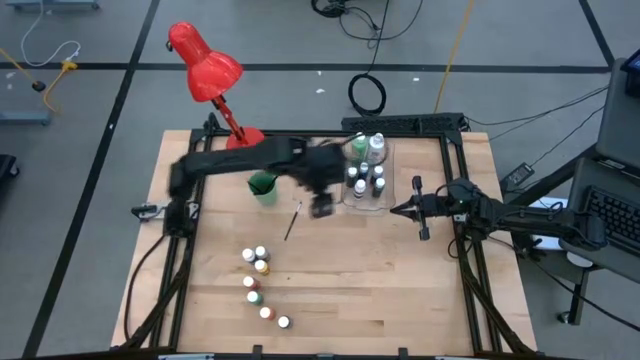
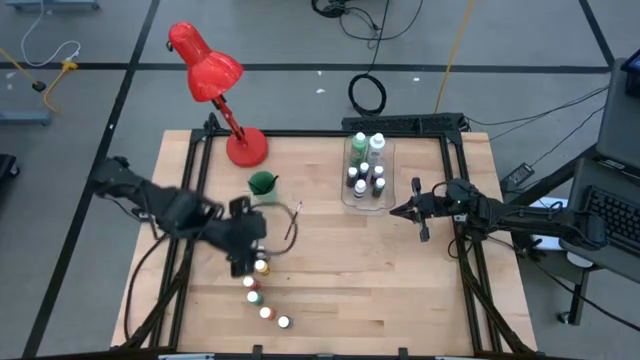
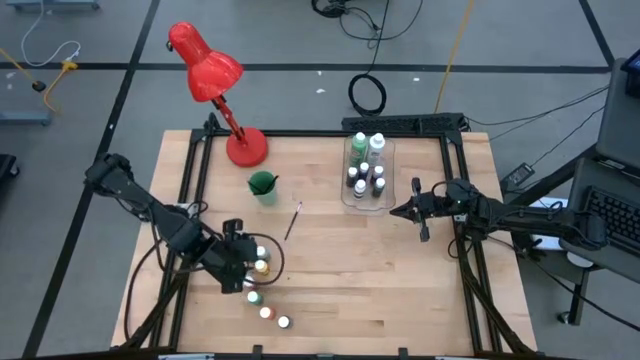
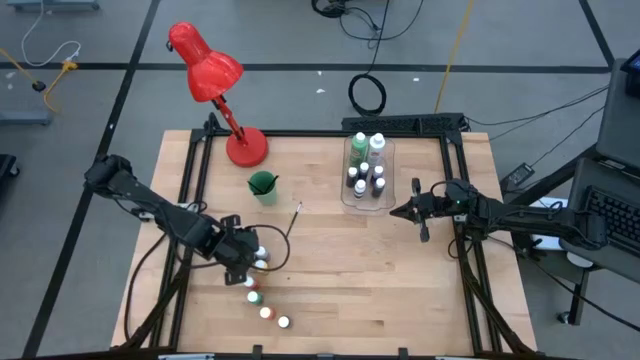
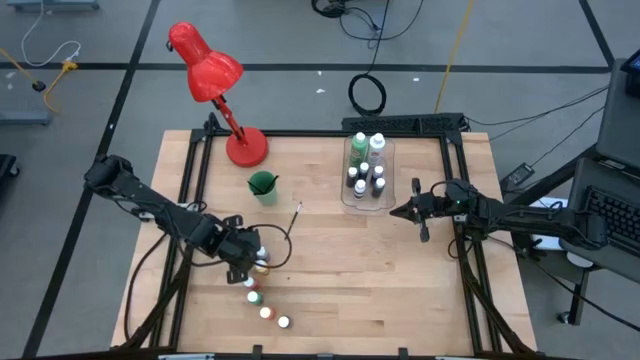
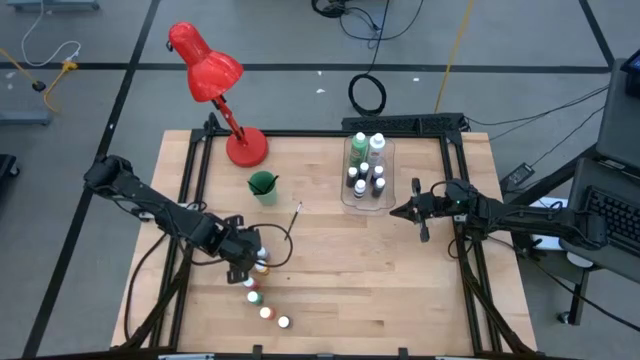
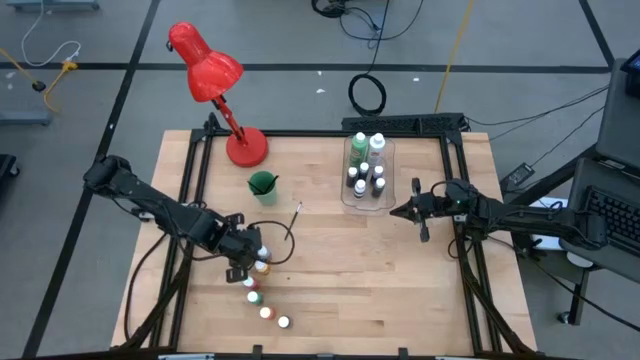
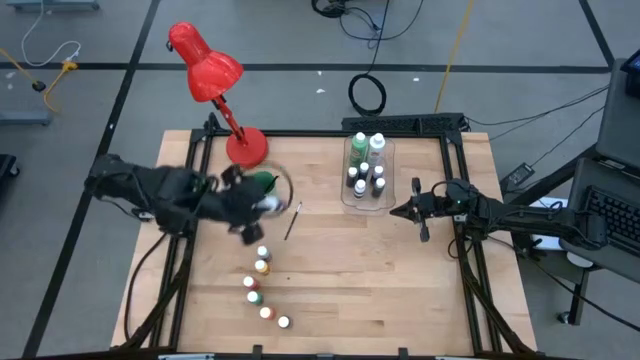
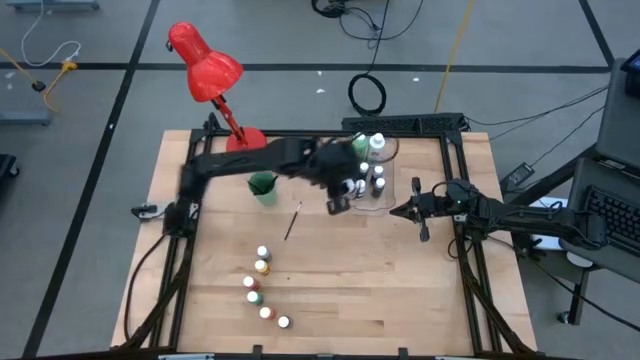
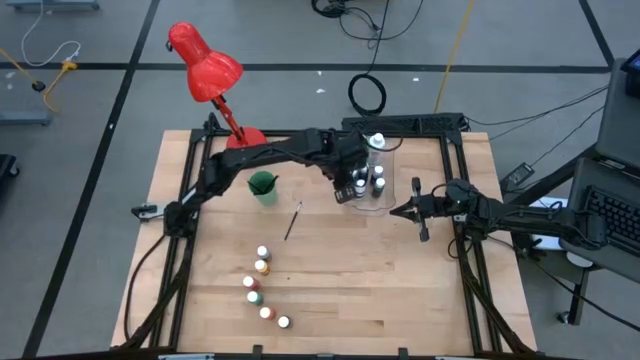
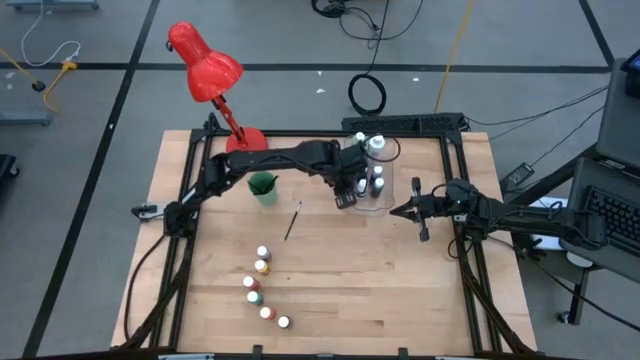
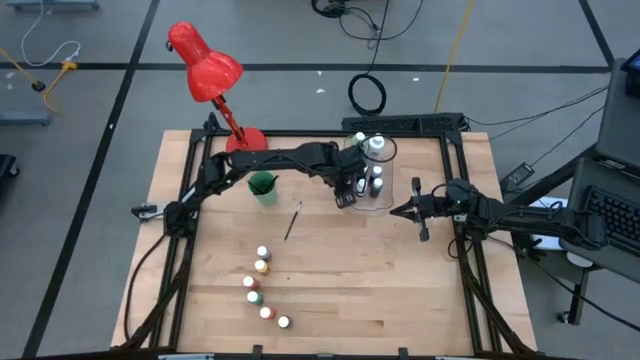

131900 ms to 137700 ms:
Task: Pick & Place Paint Supplies
Put the small white paint bottle into the transparent bin

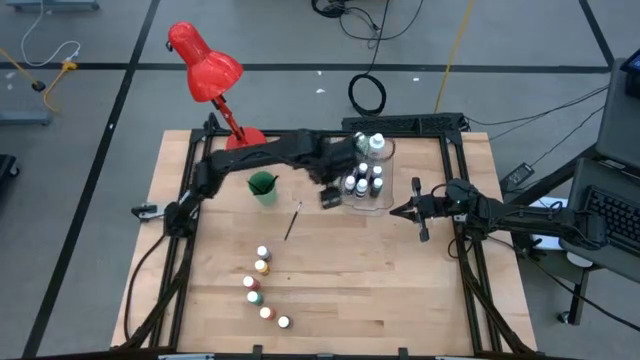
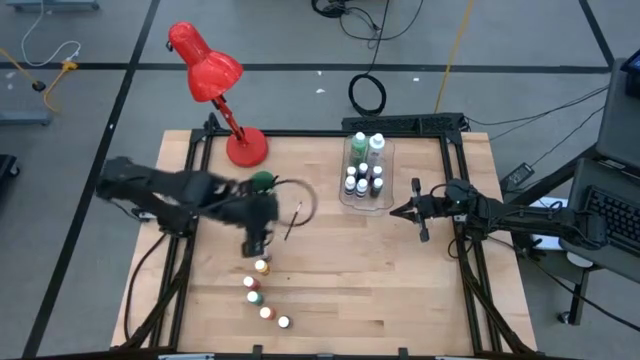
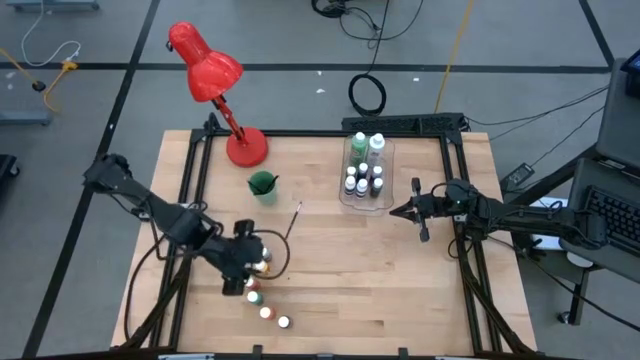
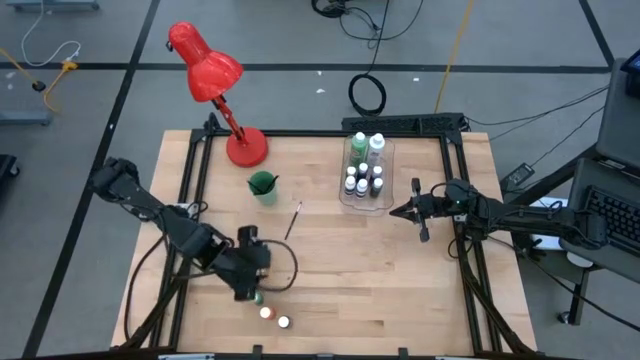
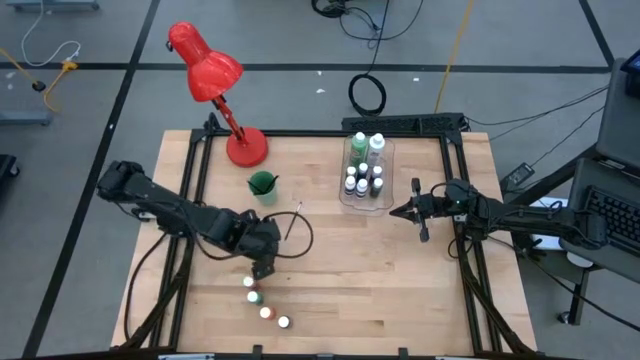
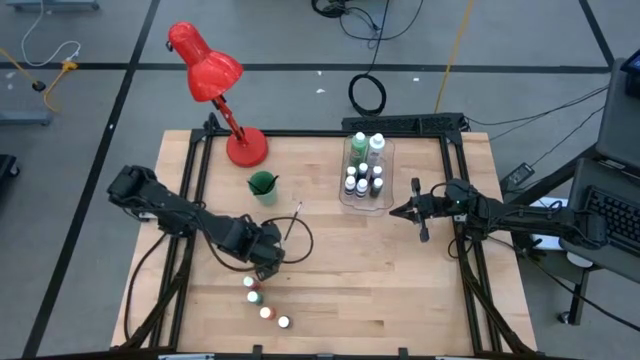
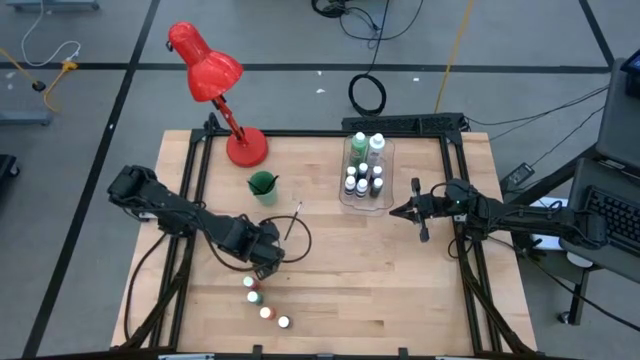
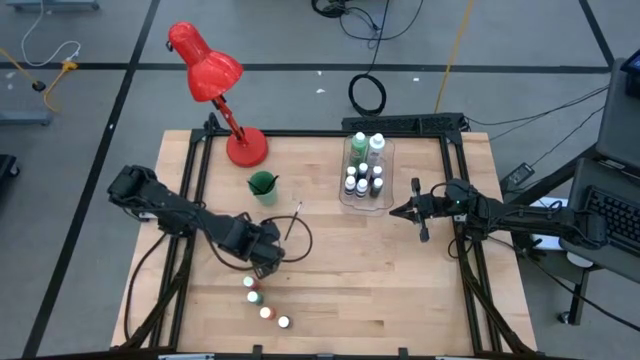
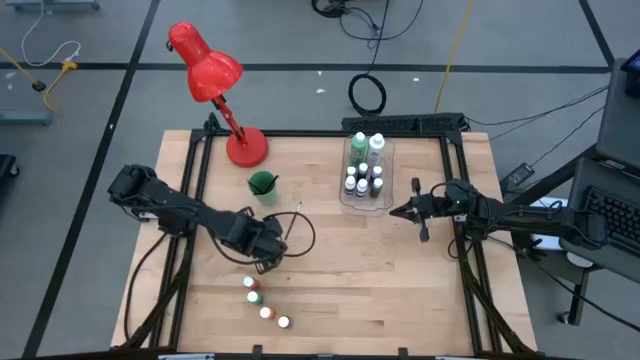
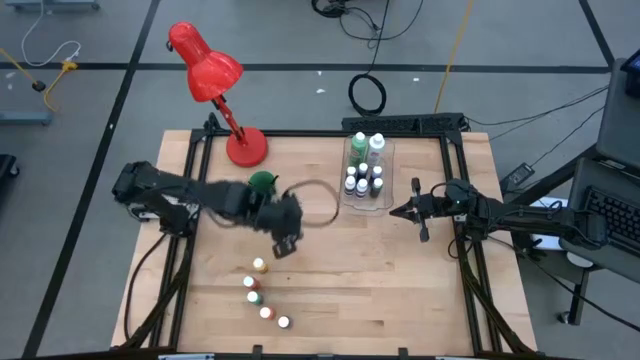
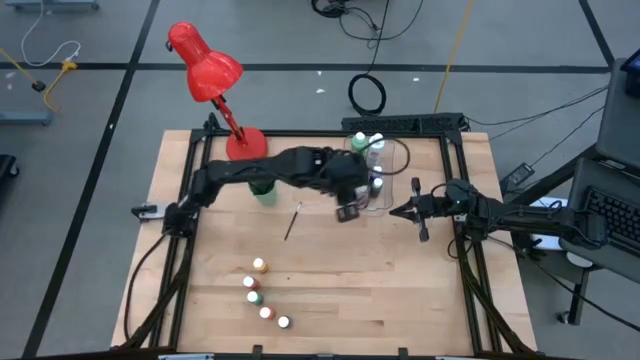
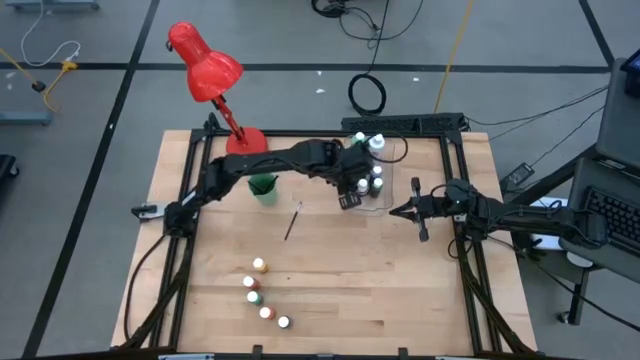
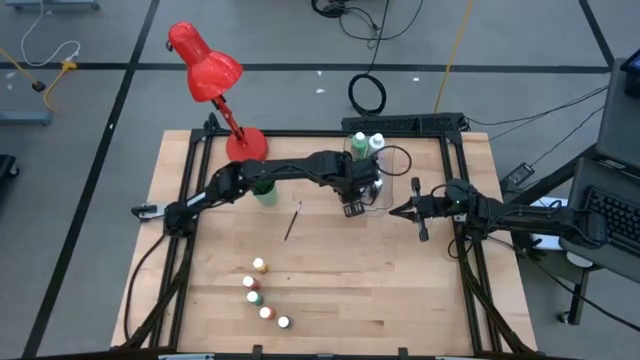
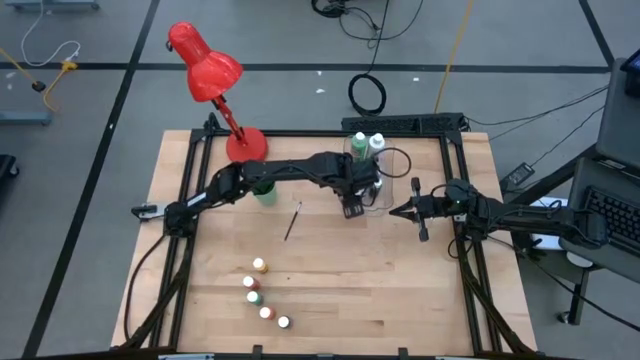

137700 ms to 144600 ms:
Put the small gray paint bottle into the transparent bin

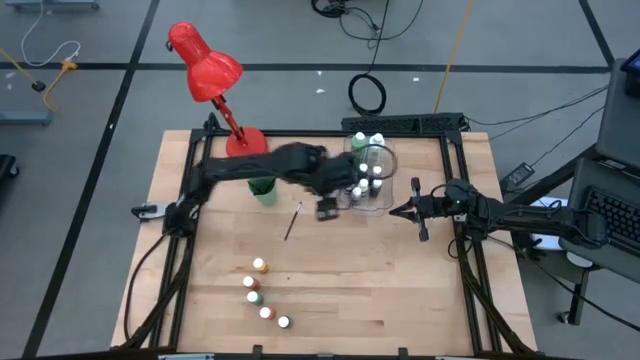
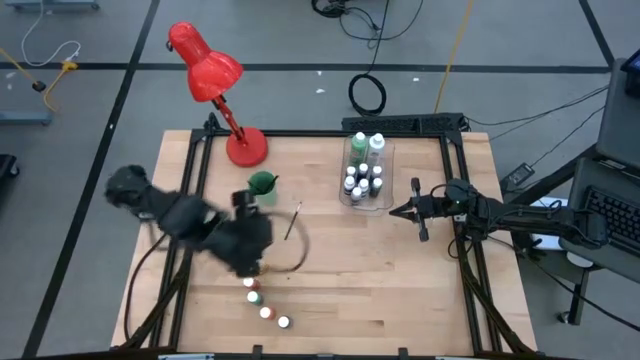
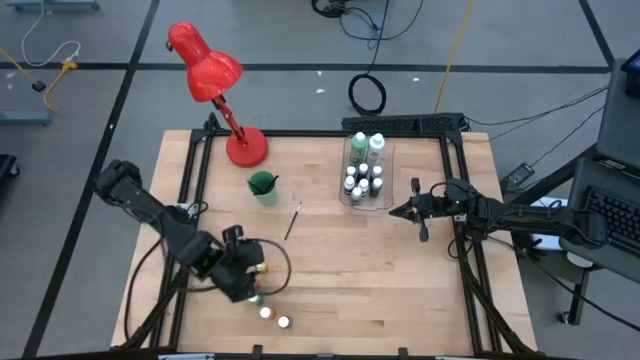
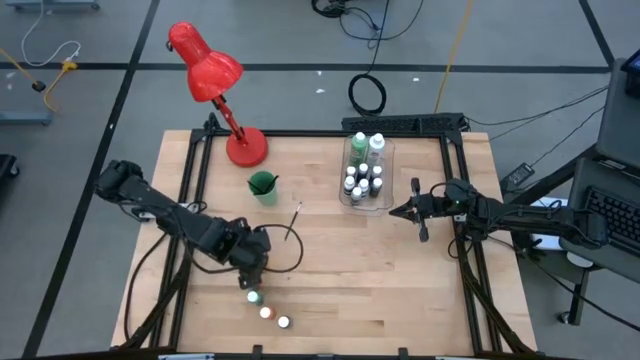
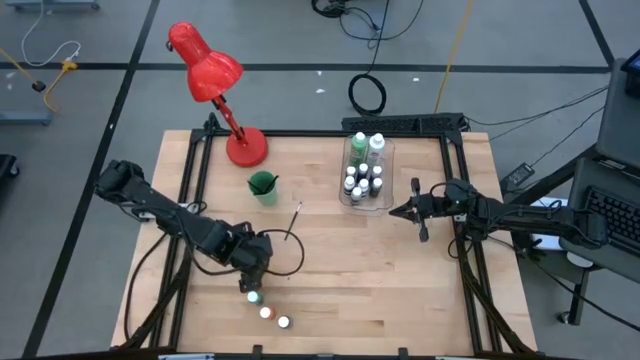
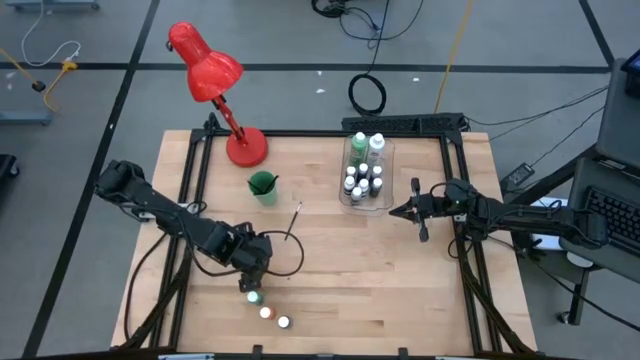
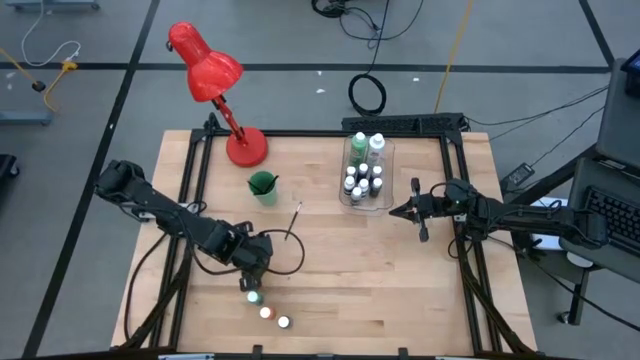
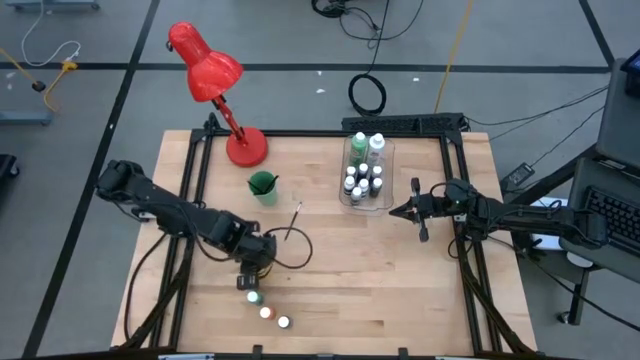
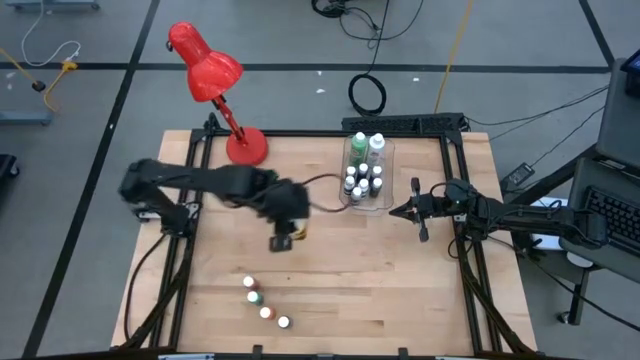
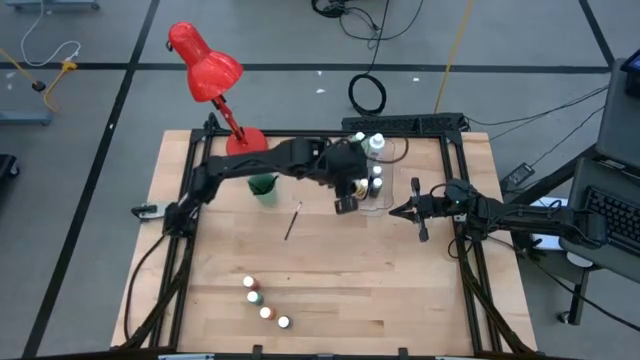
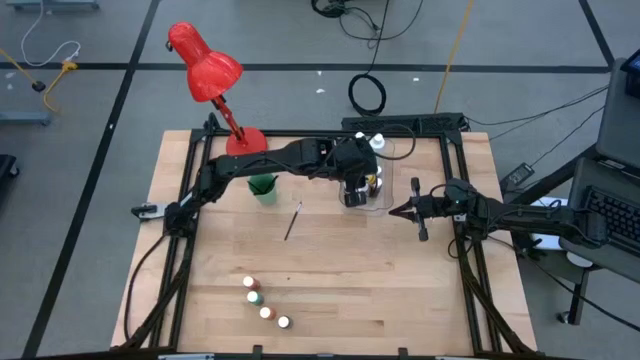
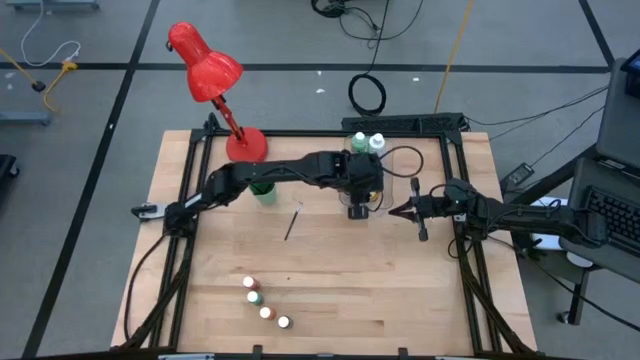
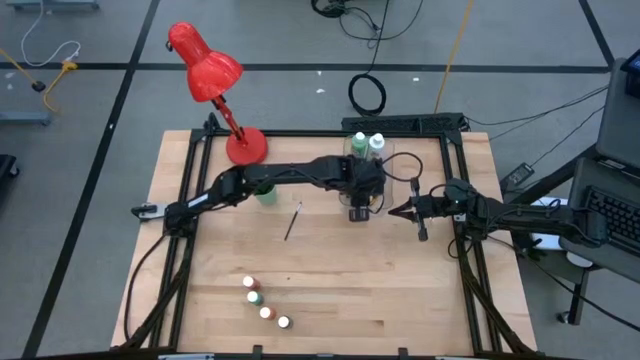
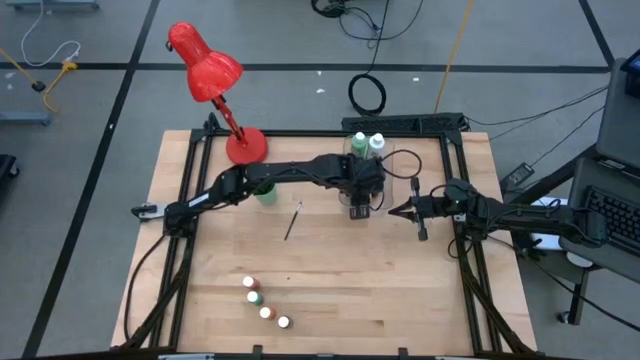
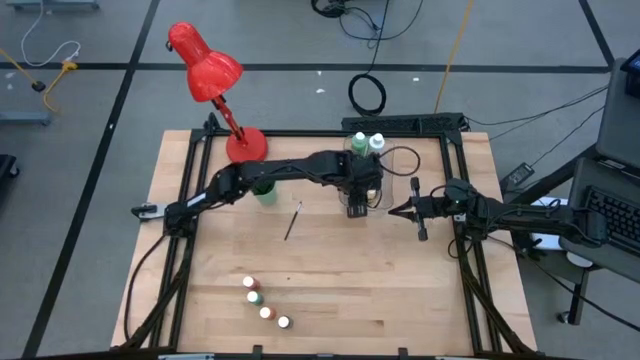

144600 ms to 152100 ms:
Put the small yellow paint bottle into the transparent bin

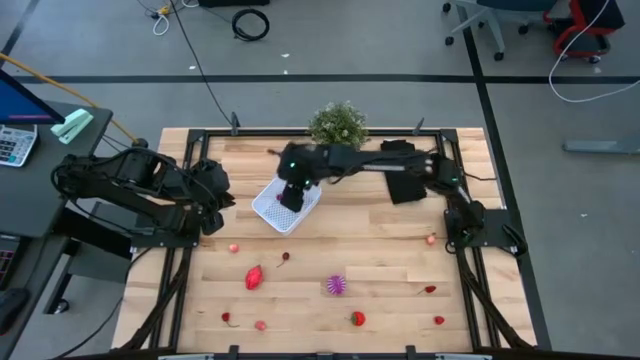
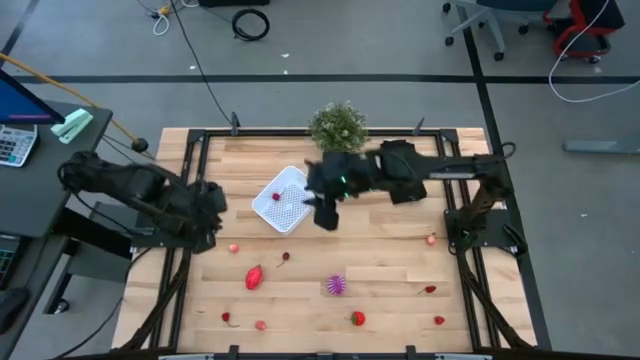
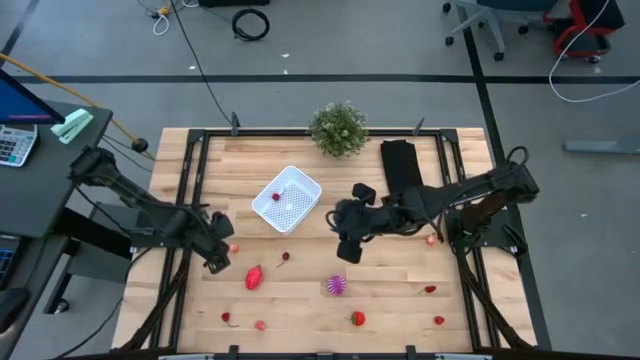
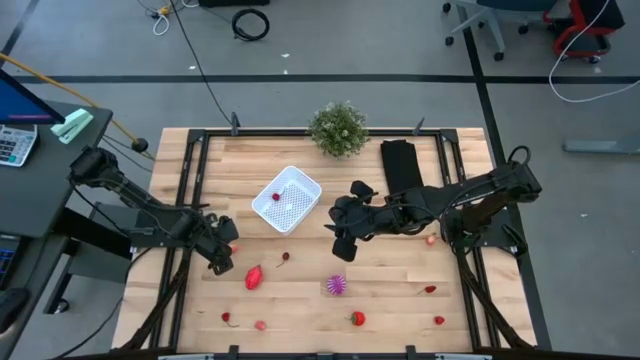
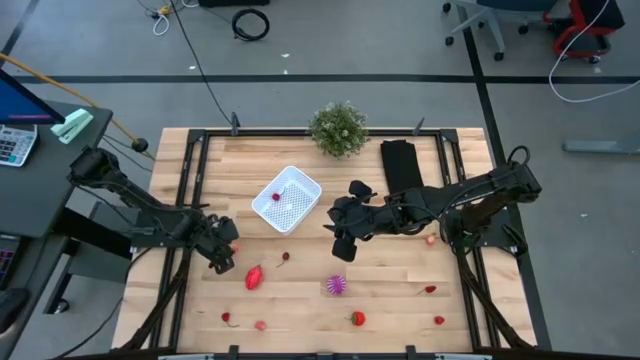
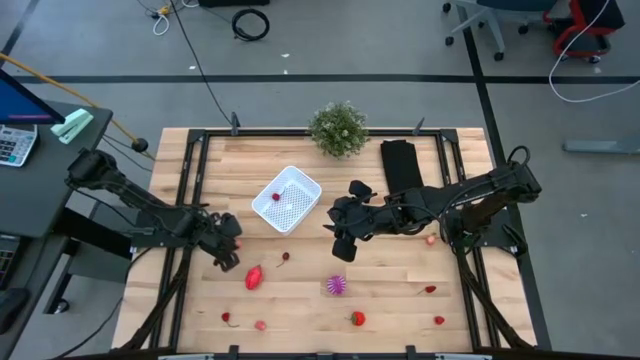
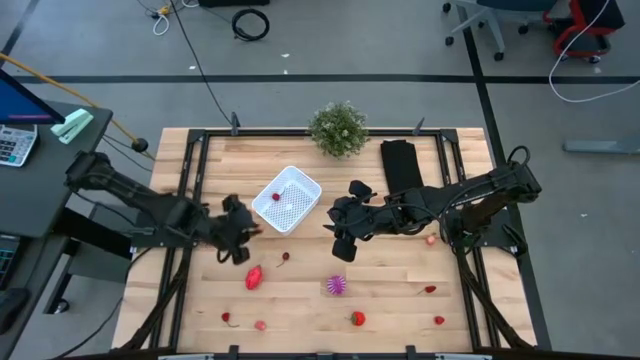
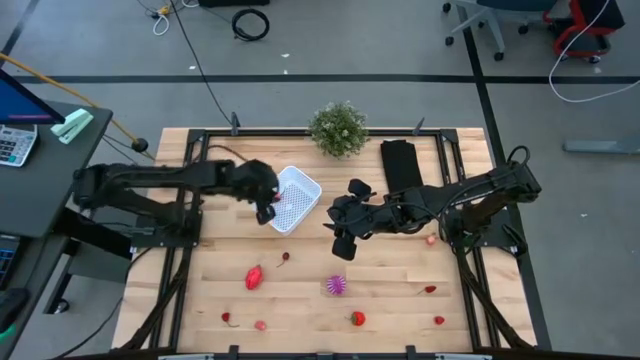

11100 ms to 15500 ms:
Task: Pick and placing Produce into tupperware
Put the pink peach into the white basket
